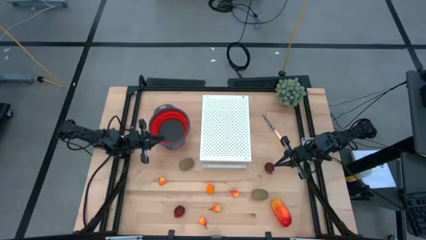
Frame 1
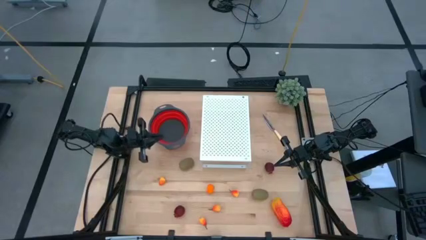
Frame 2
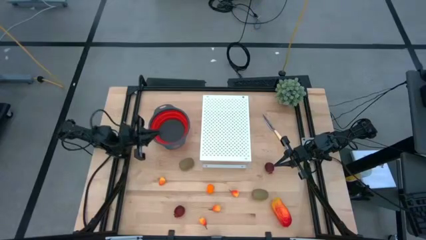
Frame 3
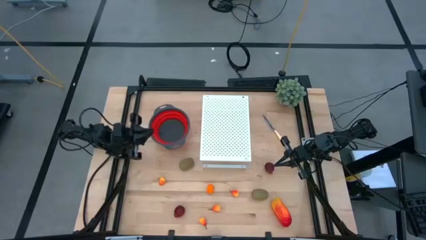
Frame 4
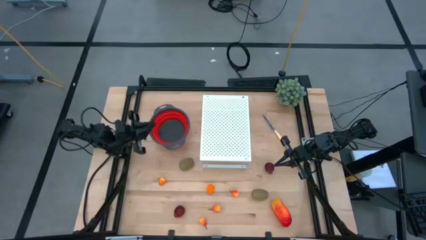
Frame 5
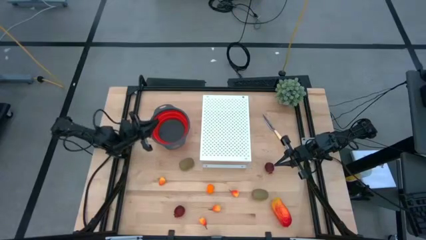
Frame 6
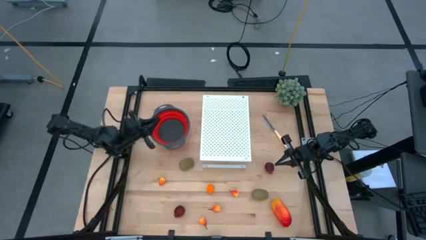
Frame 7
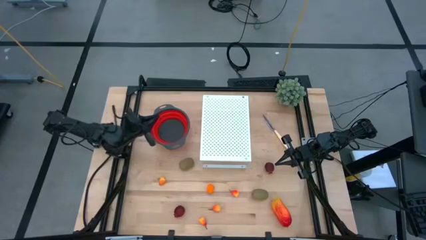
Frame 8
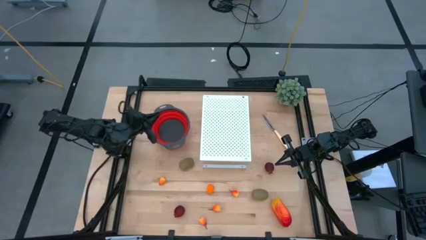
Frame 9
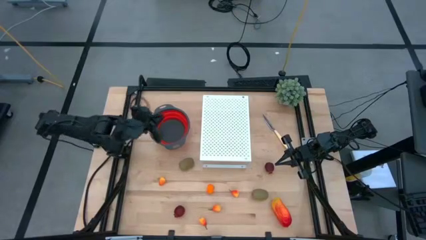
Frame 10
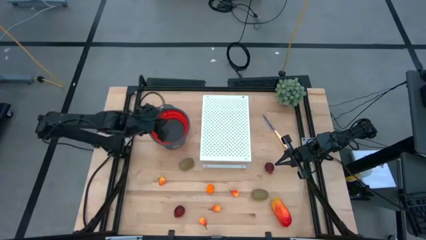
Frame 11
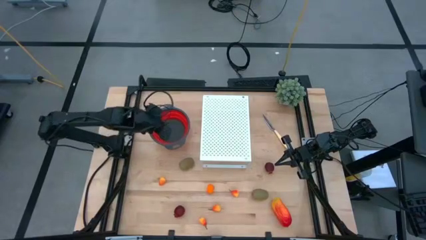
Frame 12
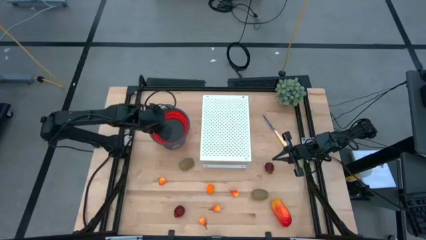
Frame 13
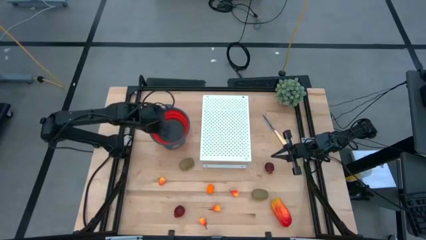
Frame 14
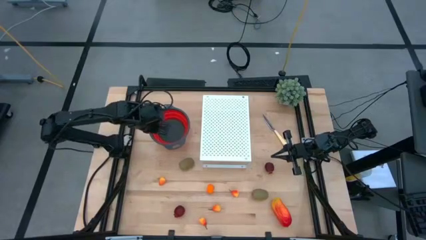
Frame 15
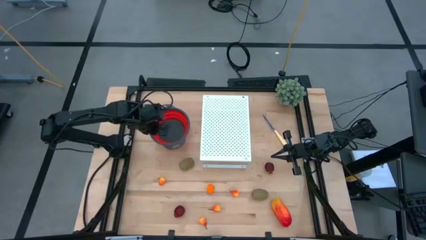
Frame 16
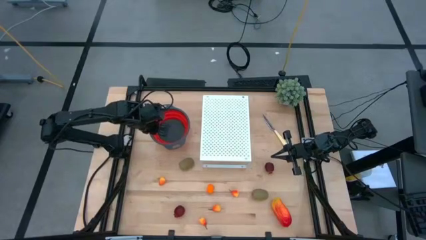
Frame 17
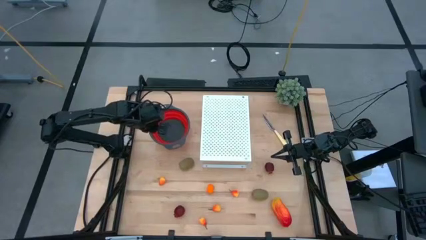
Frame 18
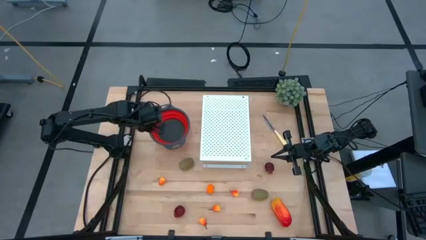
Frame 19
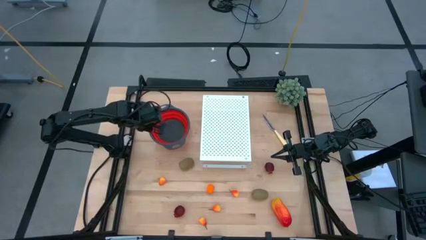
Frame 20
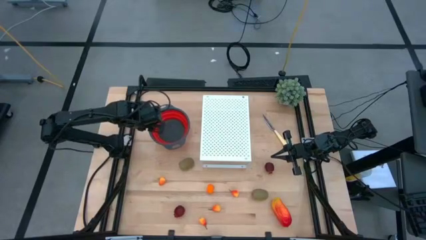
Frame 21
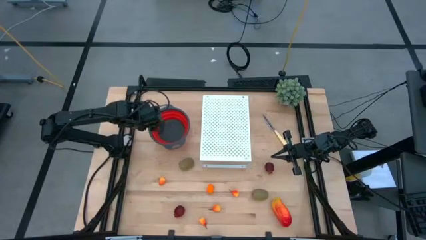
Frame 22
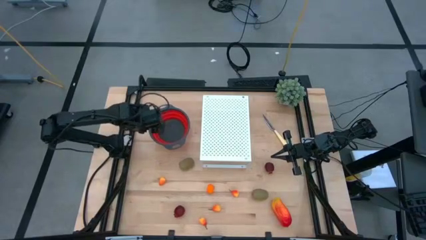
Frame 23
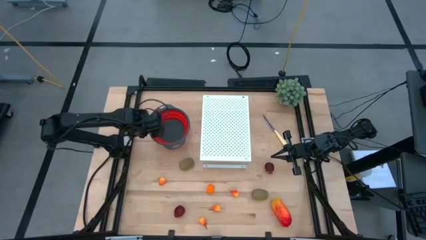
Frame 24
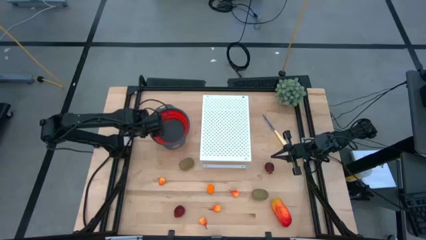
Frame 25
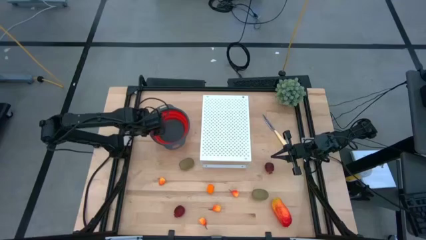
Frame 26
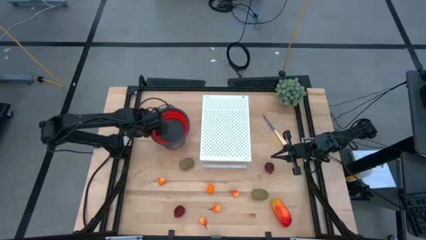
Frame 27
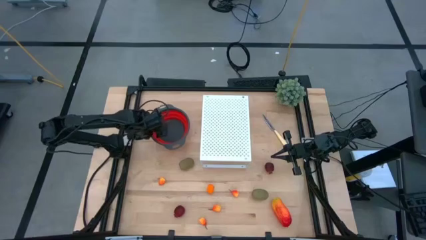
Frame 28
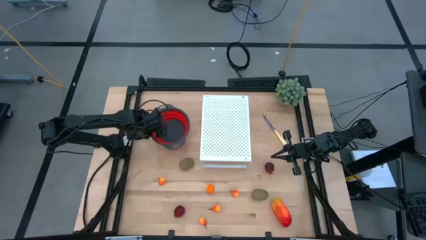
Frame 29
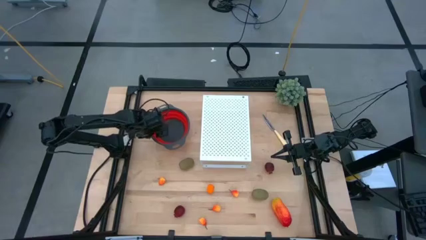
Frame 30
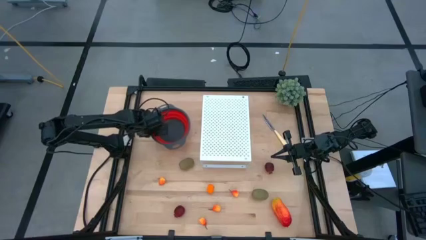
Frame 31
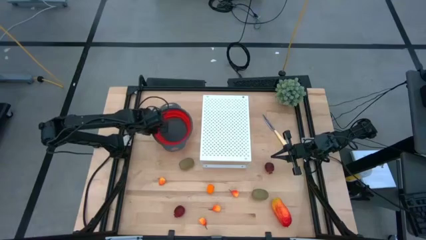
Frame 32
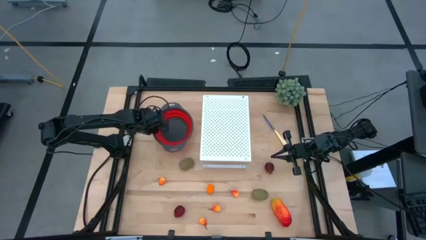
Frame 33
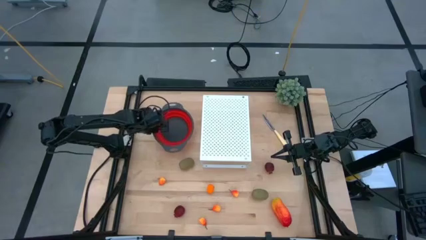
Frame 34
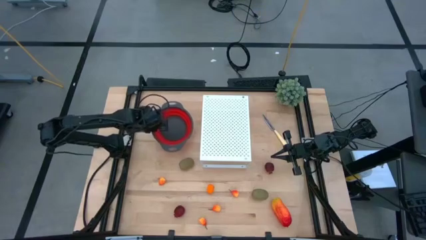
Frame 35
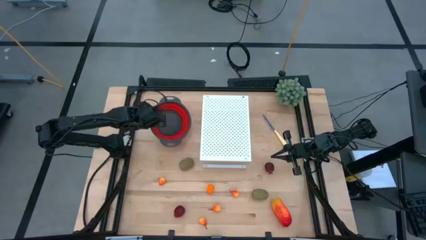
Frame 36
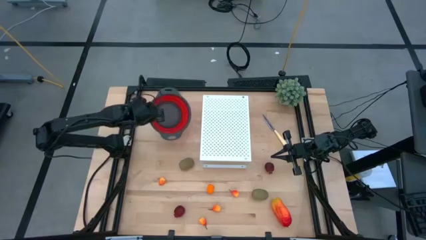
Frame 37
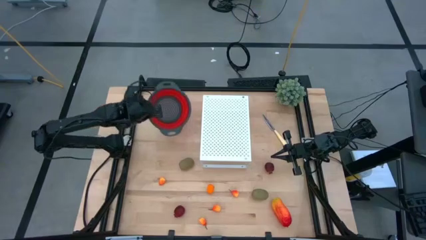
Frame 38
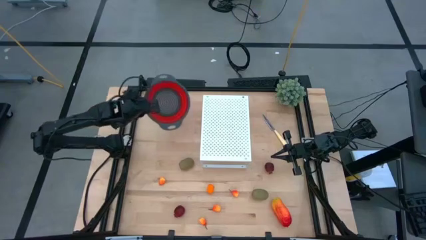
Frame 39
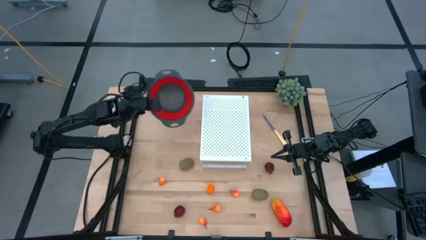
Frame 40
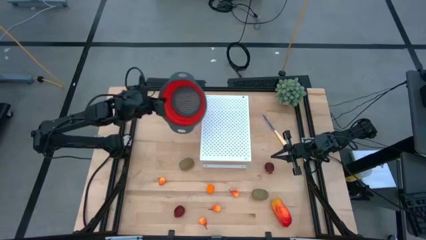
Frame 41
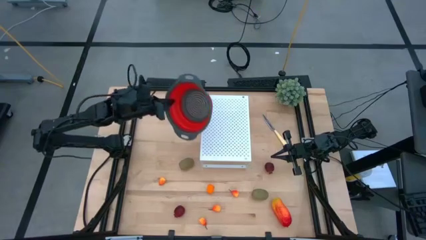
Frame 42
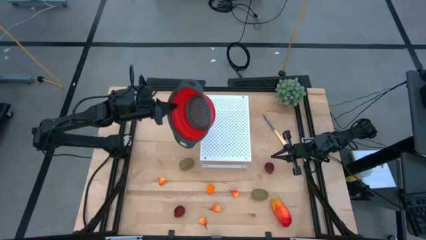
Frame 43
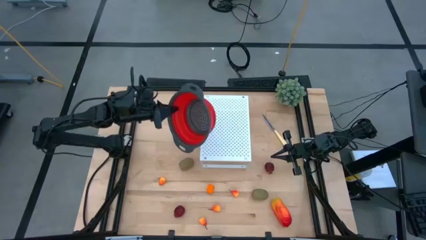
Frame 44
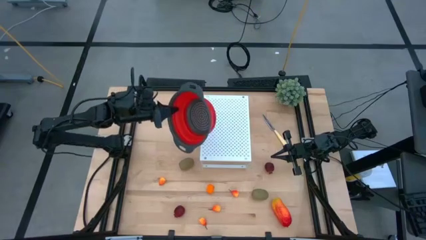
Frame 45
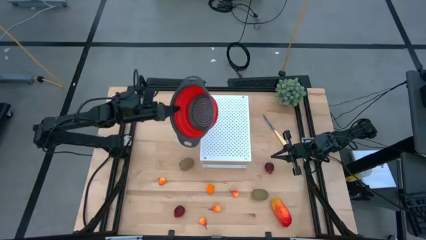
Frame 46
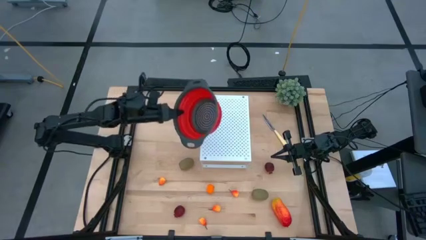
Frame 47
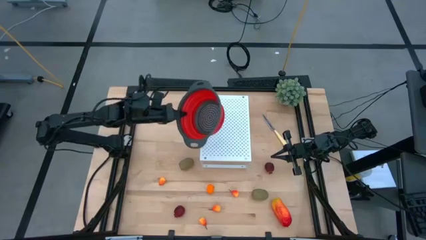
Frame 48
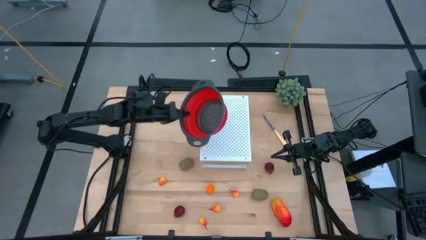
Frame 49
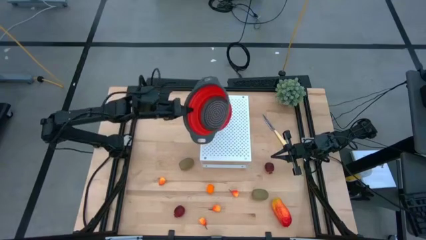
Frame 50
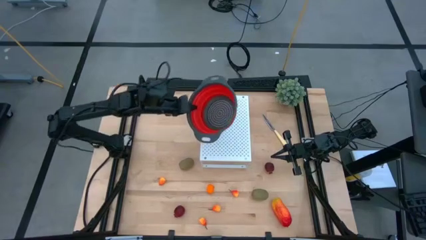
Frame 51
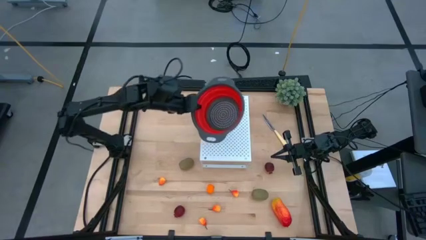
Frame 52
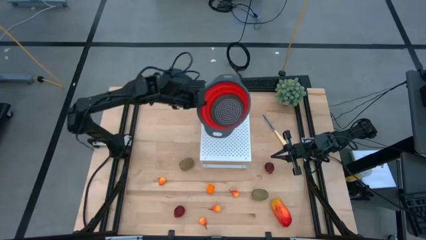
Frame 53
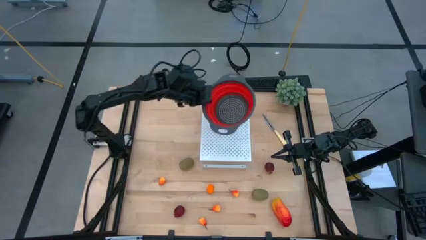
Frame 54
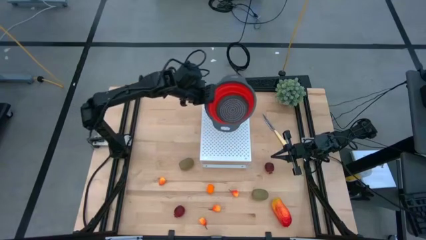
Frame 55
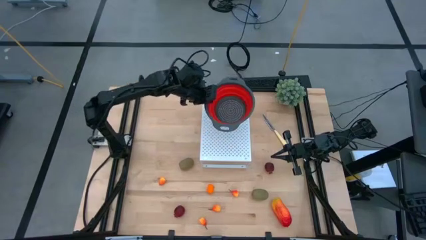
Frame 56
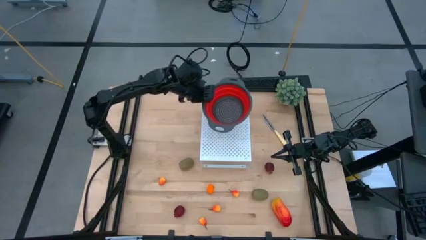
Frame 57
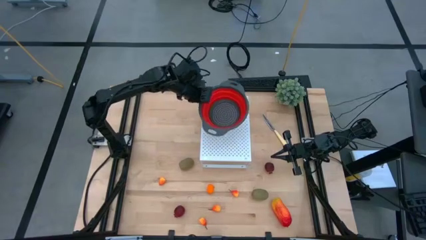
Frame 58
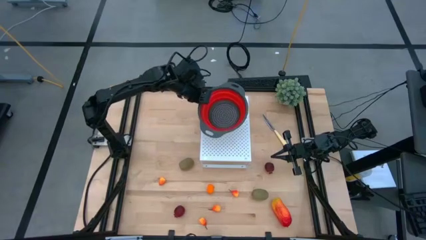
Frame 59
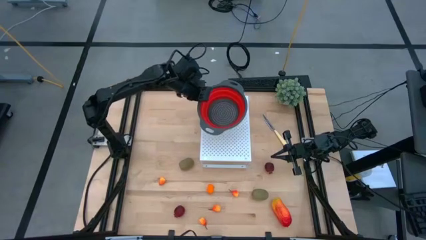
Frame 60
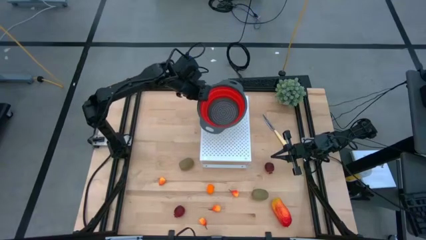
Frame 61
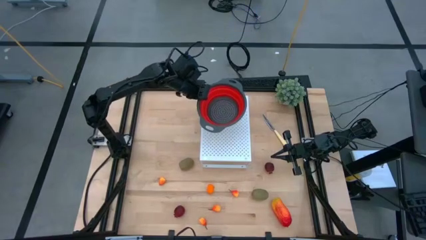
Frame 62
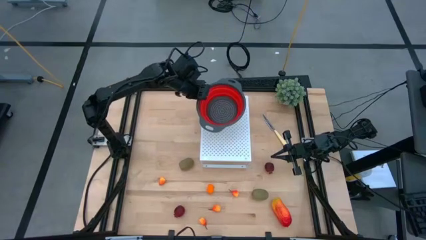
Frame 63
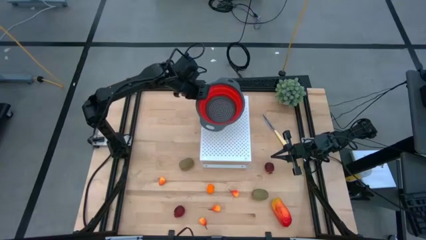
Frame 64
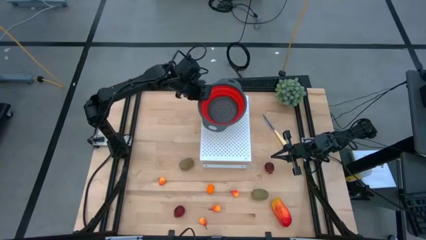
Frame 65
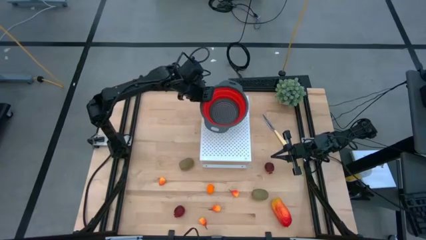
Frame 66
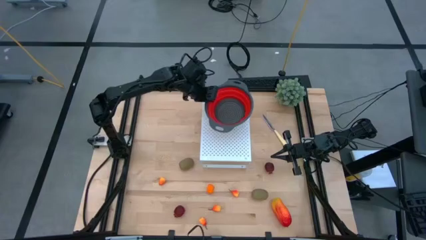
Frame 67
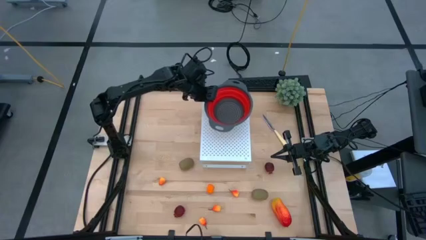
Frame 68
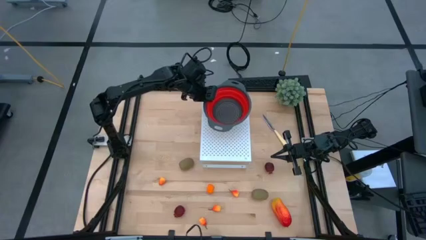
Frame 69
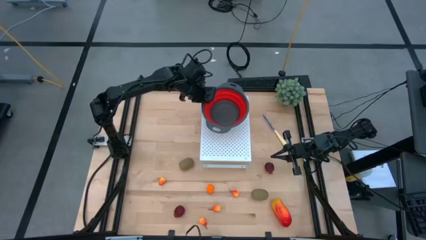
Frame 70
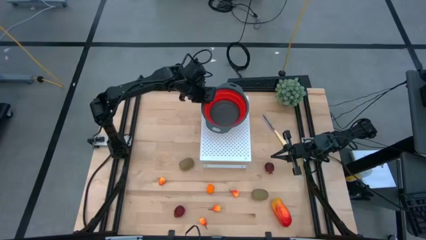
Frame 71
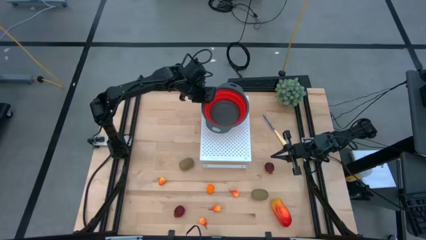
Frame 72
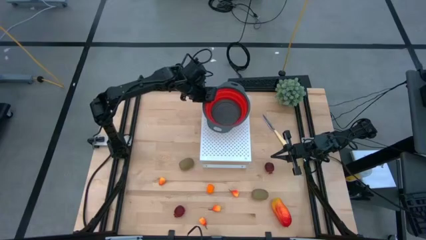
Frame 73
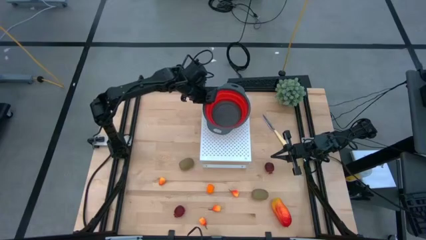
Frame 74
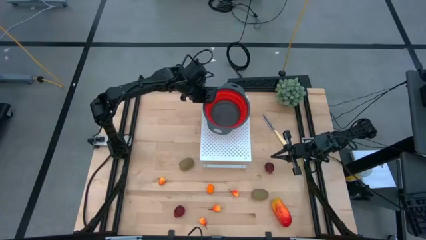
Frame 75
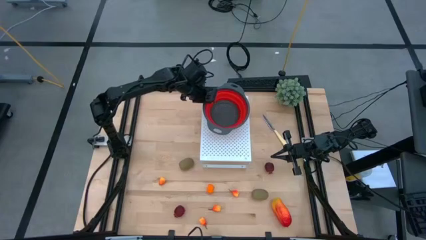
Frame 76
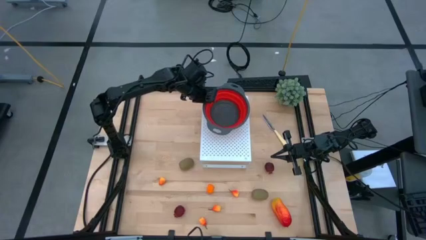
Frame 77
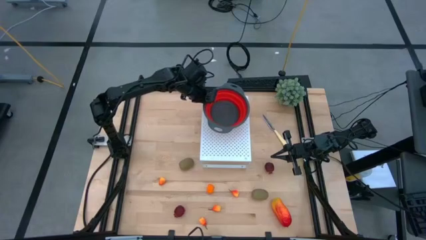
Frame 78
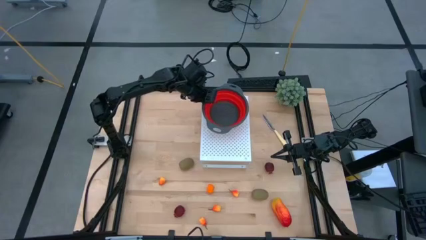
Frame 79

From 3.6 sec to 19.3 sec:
Task: Pick & Place Fruit
Put the red strainer bowl on the shelf
